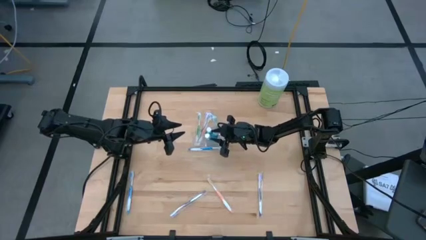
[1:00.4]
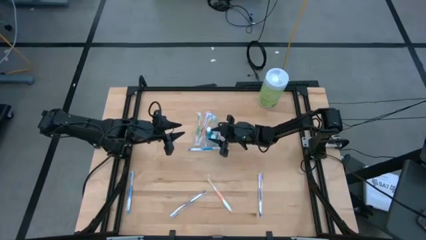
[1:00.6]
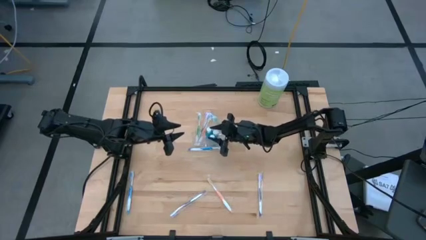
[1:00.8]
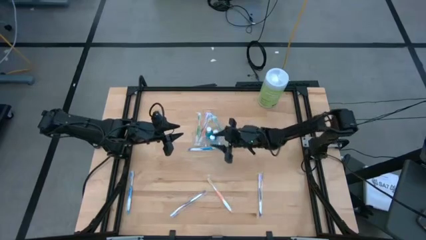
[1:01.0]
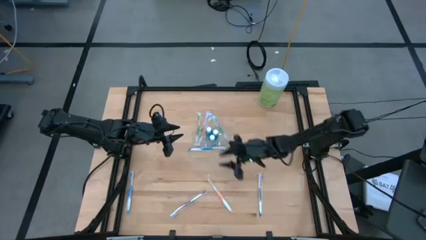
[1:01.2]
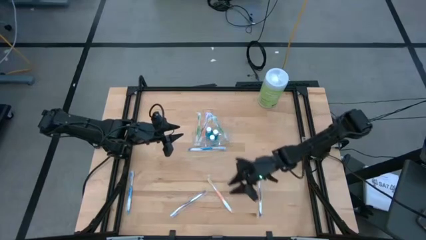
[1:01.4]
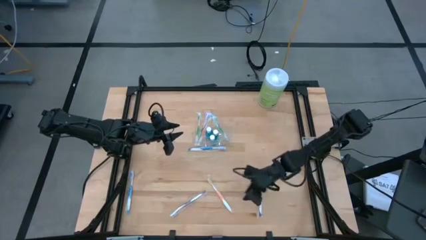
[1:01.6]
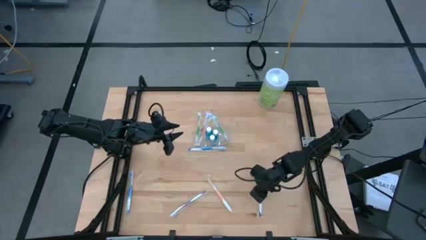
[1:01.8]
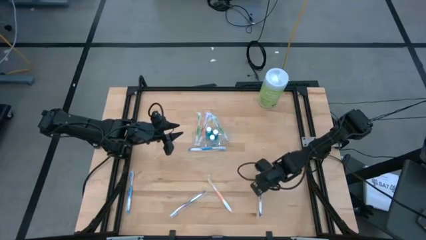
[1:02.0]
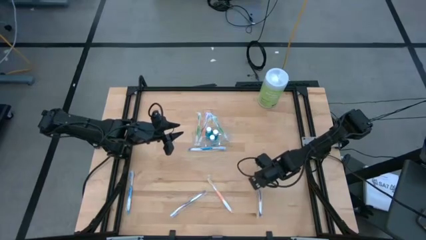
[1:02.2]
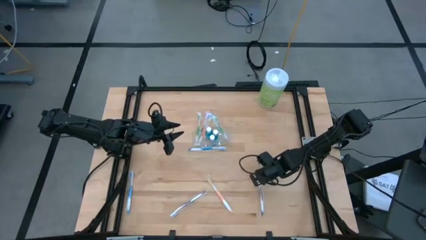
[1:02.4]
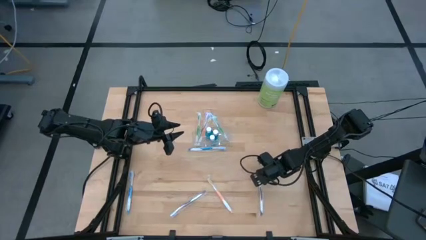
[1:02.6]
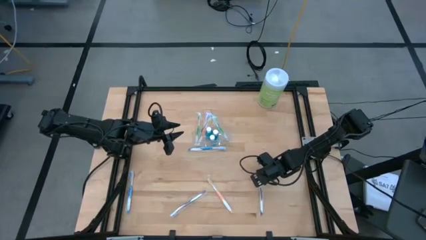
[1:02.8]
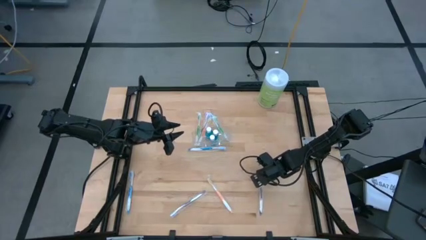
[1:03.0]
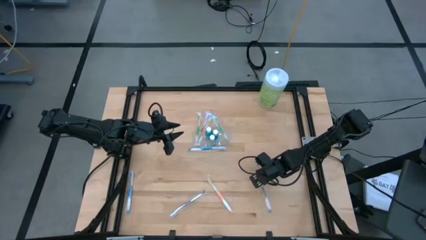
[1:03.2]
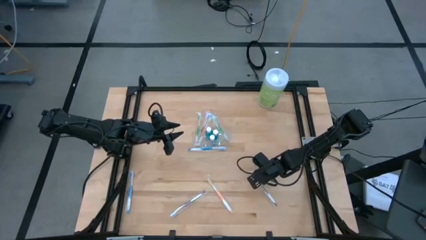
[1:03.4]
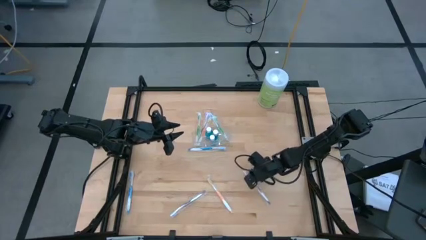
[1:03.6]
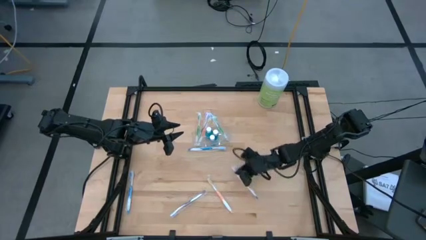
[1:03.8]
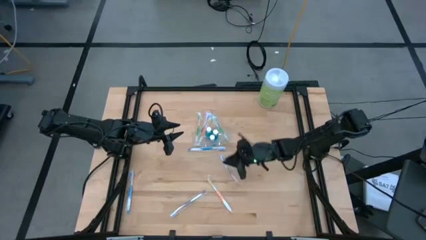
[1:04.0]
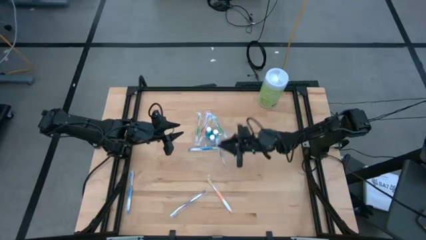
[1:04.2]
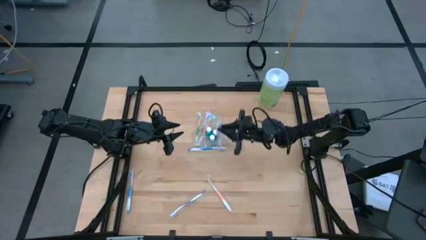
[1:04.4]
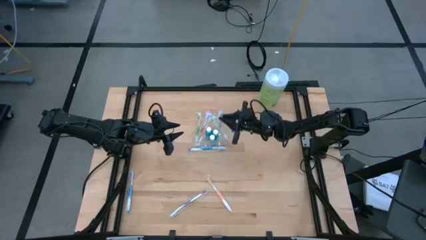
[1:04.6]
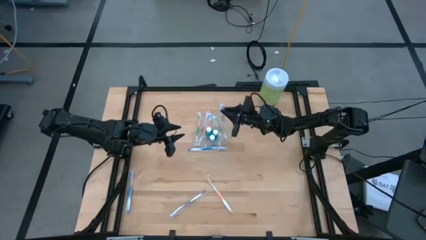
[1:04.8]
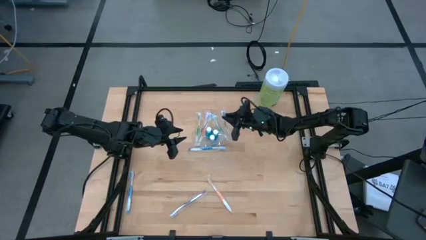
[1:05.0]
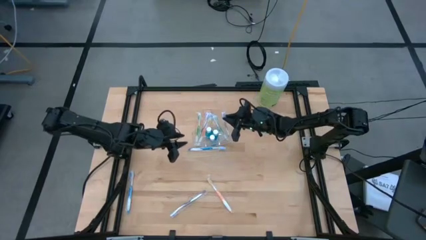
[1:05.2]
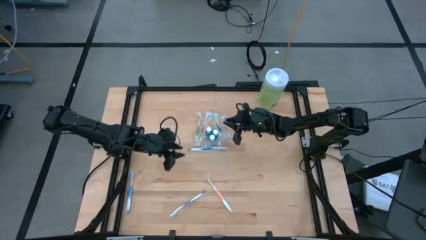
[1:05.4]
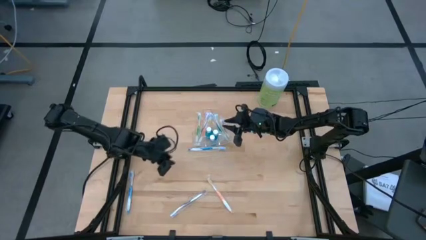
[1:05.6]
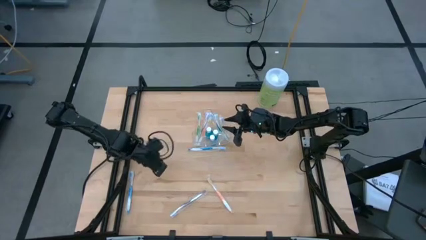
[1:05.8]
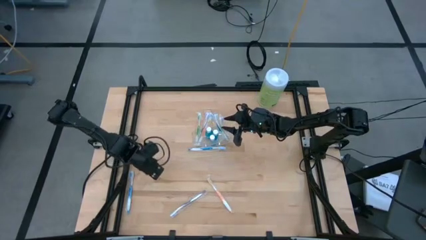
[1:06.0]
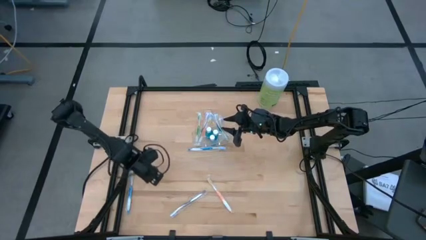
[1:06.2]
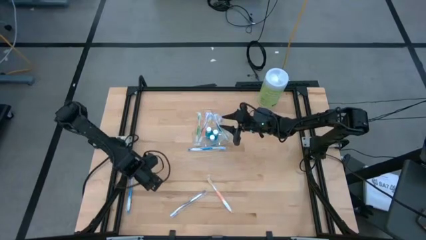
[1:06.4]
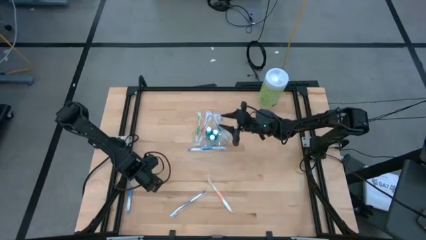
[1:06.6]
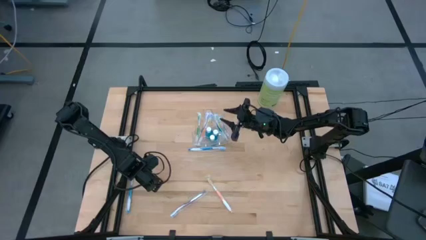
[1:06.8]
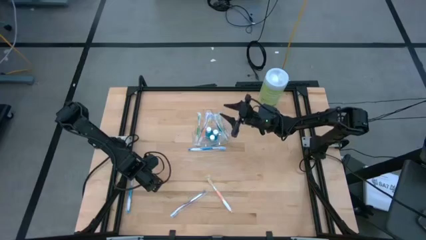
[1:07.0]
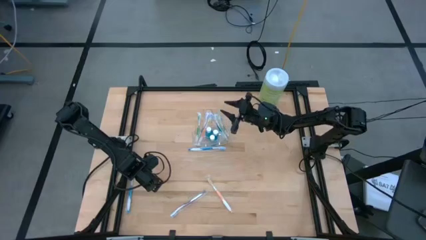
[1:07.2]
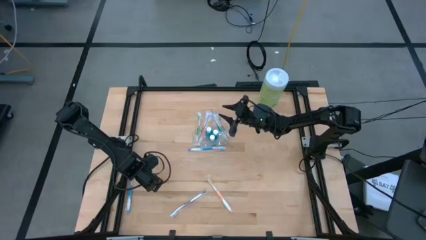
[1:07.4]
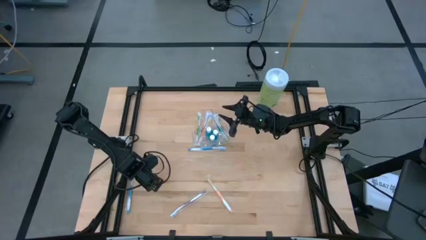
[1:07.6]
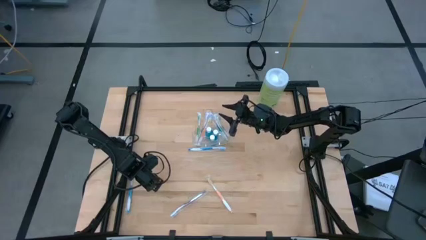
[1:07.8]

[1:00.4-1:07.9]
Task: Pick & Place toothbrushing station
Put the right purple toothbrush into the transparent organizer

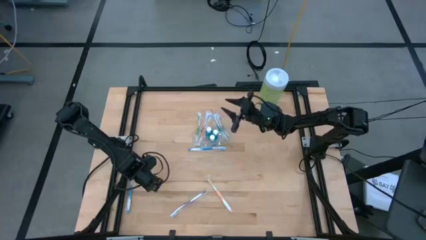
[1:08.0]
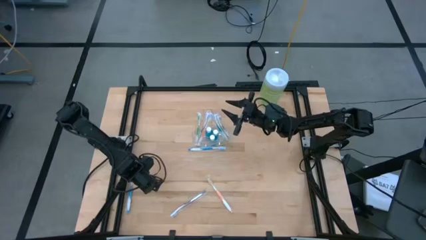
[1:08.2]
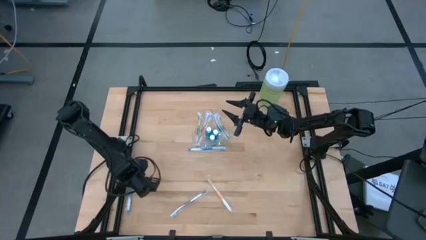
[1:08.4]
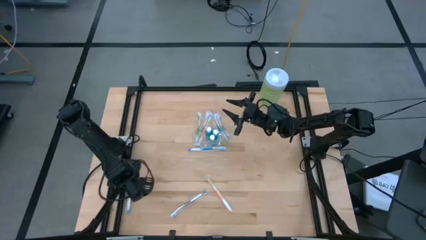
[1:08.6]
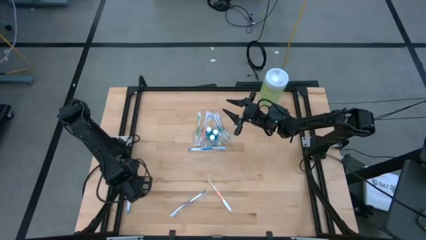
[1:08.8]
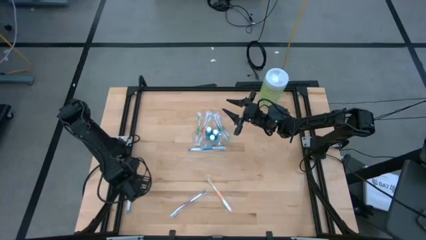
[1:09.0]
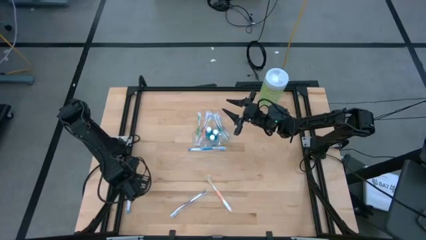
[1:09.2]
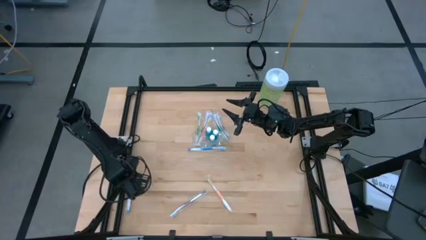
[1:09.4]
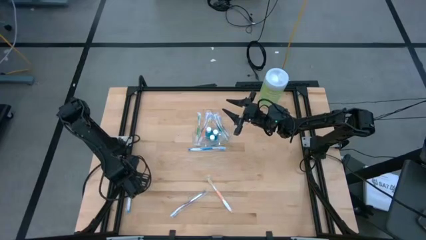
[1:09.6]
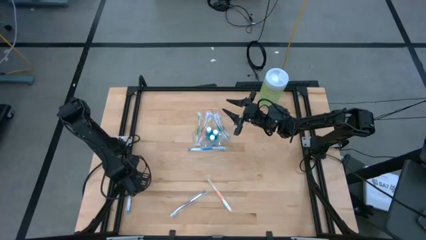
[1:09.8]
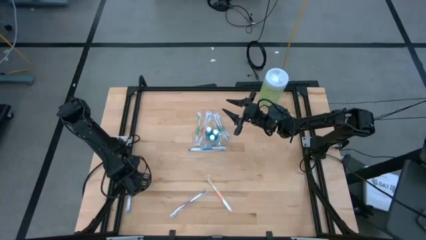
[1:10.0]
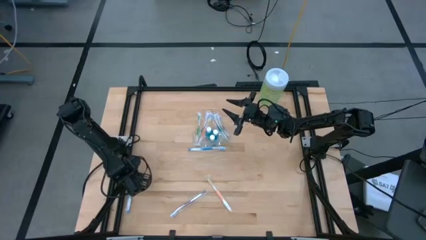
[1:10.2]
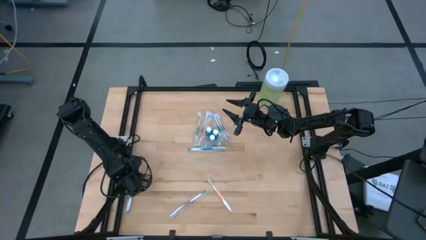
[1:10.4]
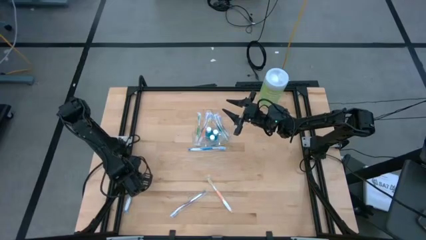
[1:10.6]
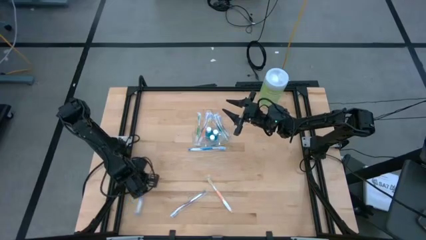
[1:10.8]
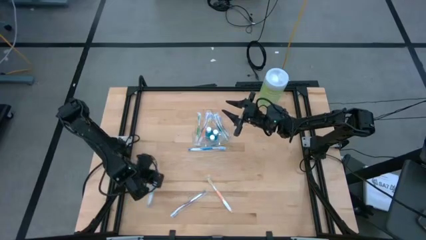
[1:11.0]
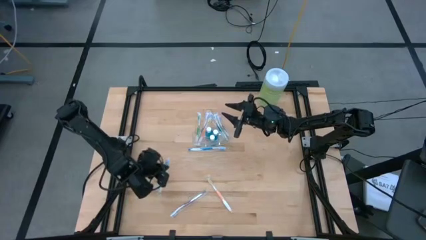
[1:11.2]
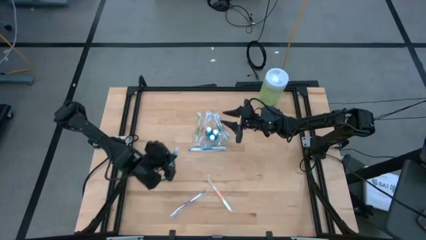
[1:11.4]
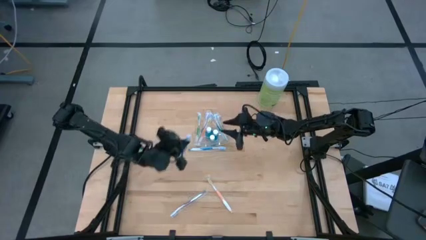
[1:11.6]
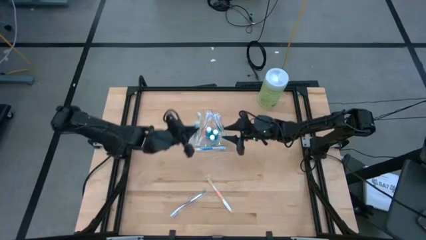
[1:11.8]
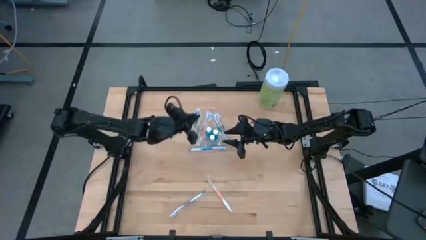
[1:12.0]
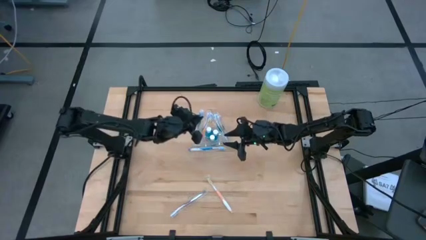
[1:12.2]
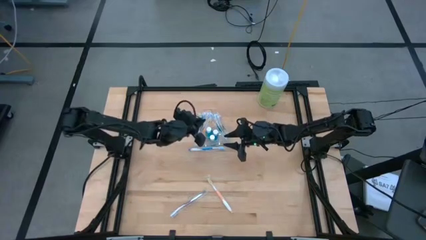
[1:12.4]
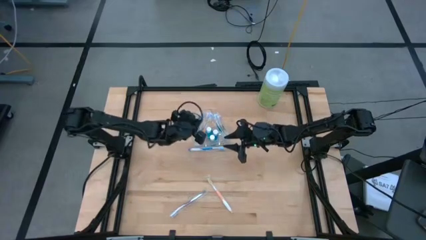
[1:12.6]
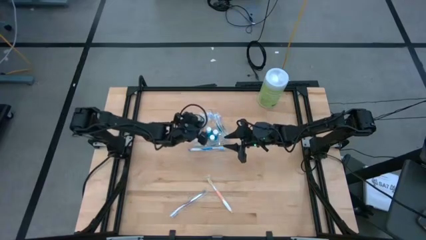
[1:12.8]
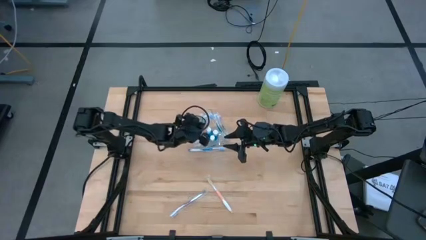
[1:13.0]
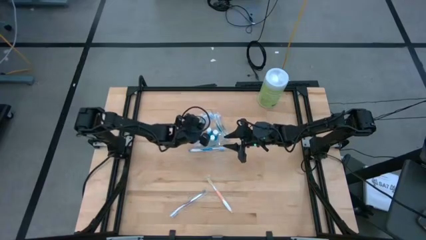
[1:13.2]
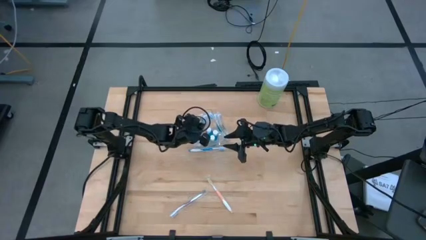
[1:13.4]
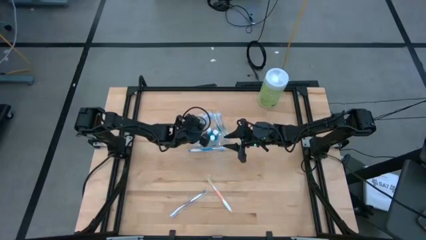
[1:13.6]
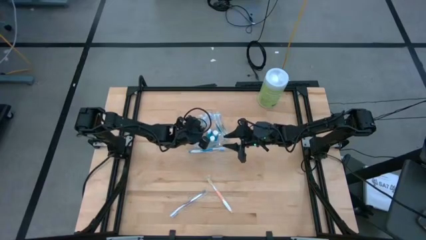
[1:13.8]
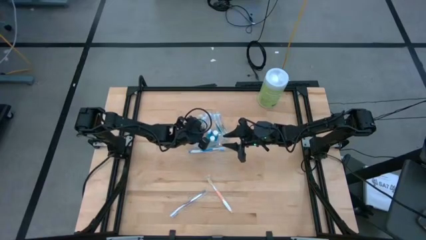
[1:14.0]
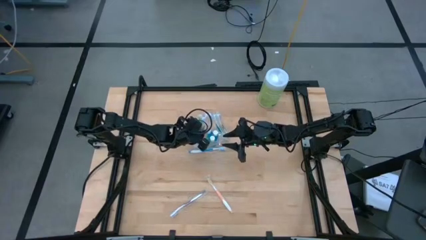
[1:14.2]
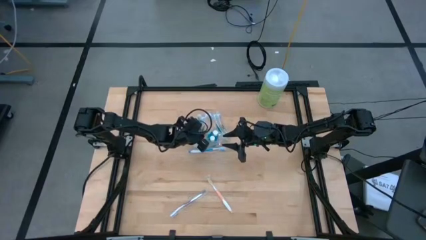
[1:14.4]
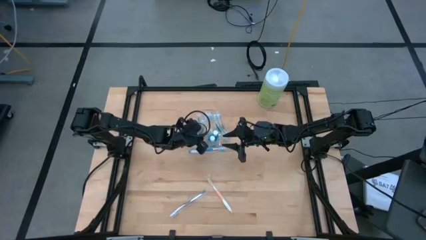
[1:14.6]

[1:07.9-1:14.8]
Put the bottom blue toothbrush into the transparent organizer

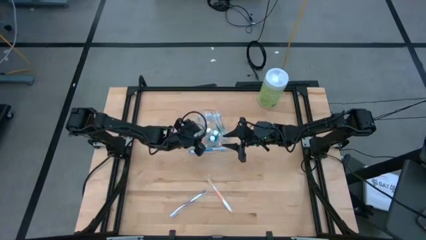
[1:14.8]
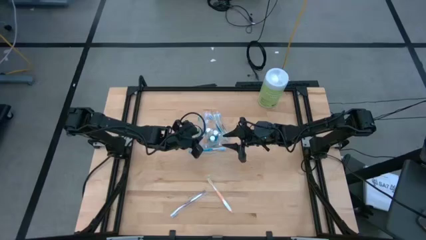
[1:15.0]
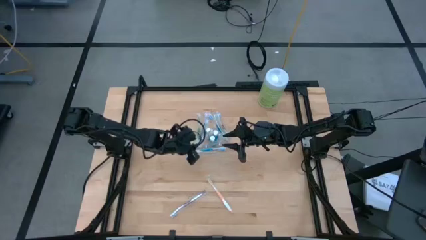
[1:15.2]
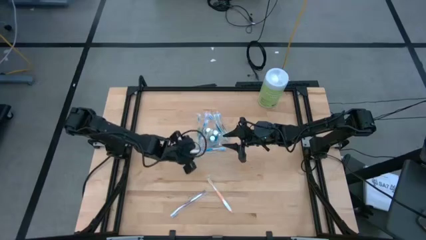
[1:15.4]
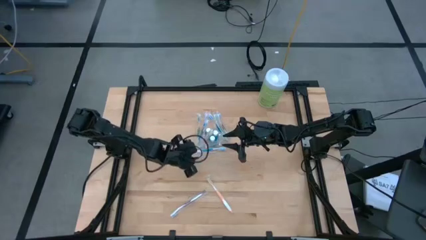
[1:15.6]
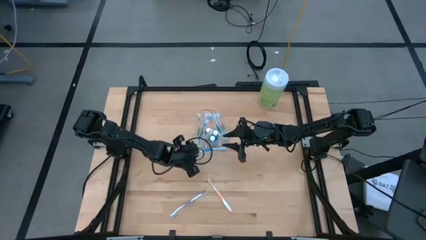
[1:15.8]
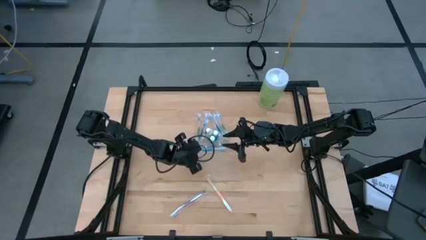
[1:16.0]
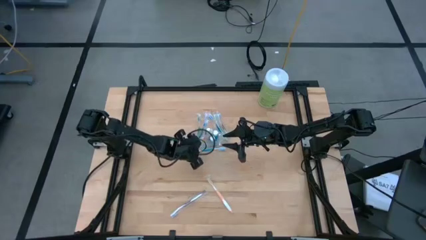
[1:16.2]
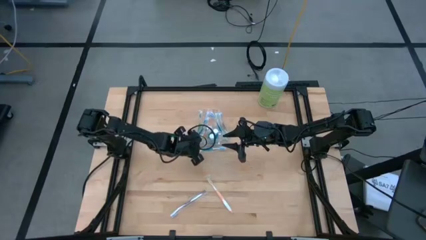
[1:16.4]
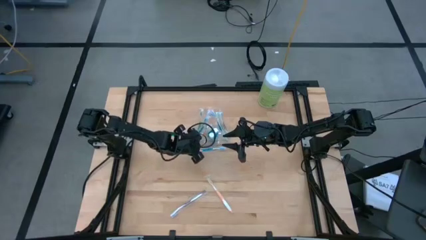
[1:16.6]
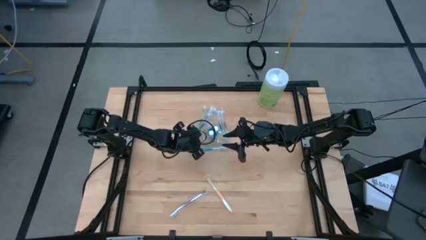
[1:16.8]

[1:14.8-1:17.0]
Adjust the transparent organizer on the table
